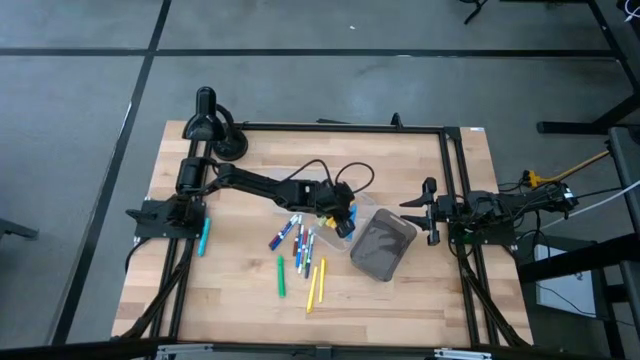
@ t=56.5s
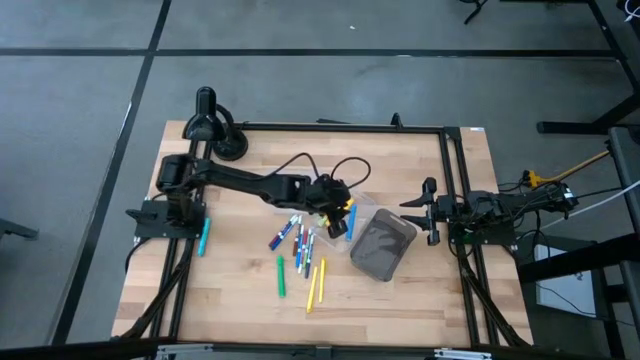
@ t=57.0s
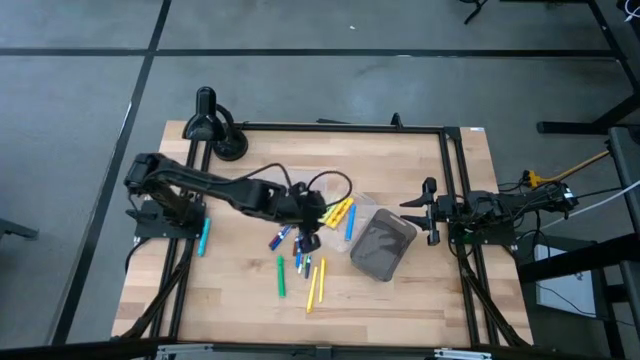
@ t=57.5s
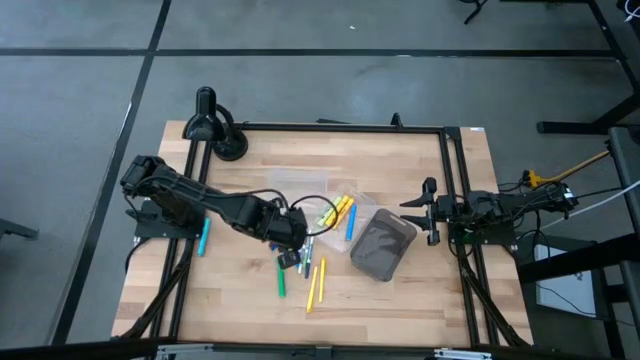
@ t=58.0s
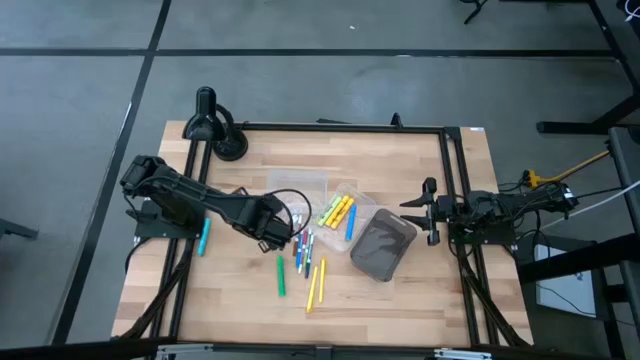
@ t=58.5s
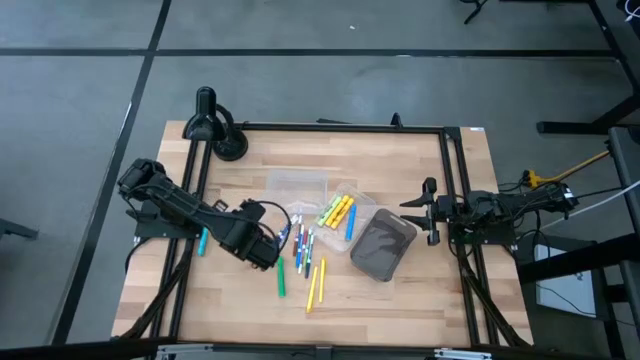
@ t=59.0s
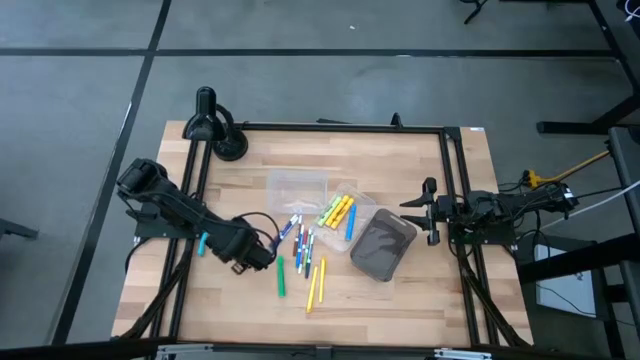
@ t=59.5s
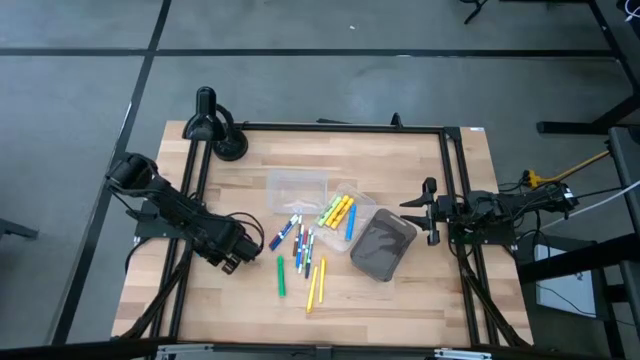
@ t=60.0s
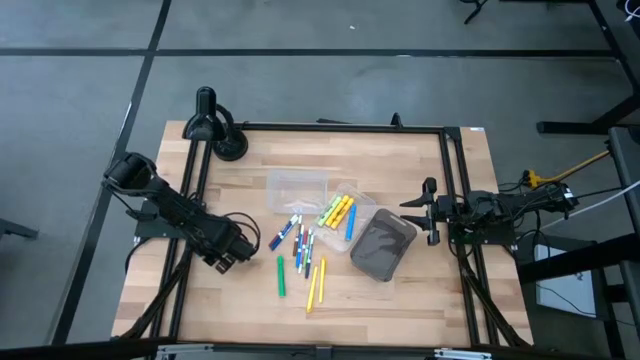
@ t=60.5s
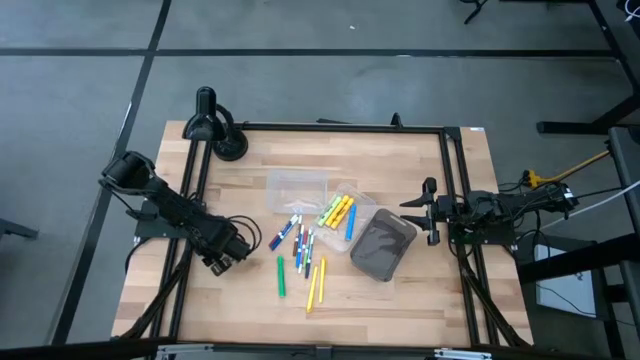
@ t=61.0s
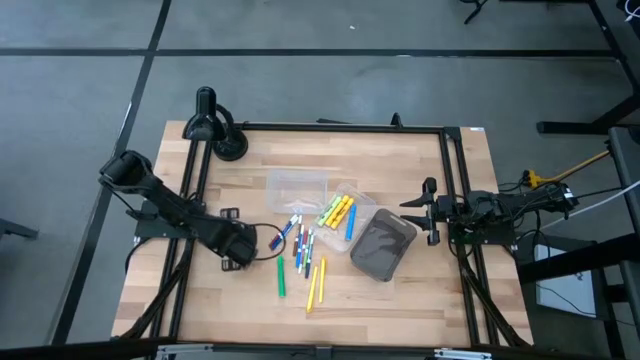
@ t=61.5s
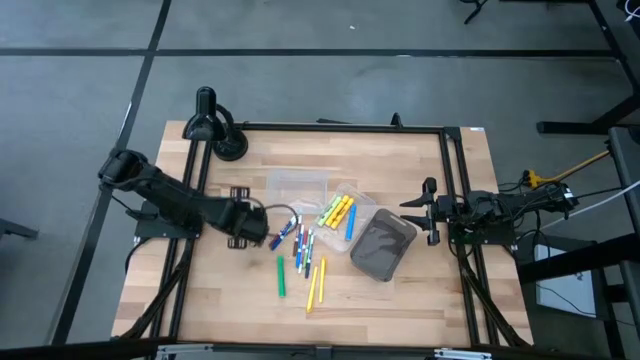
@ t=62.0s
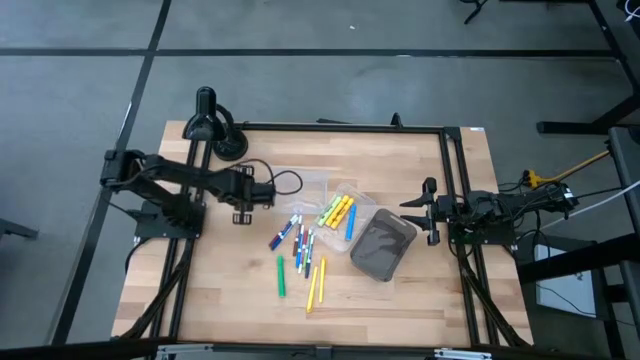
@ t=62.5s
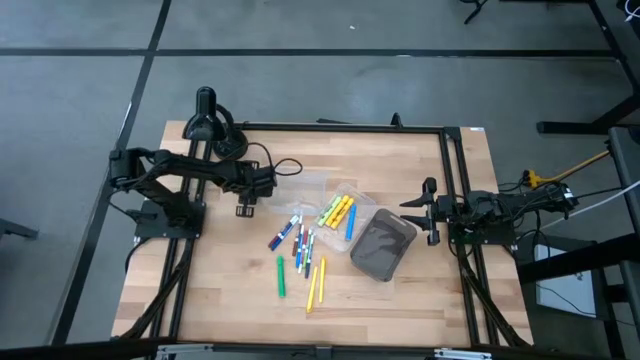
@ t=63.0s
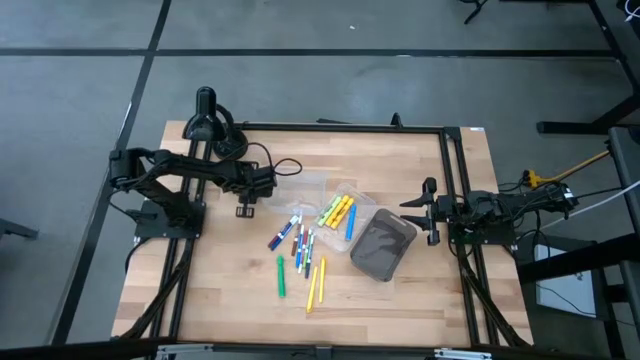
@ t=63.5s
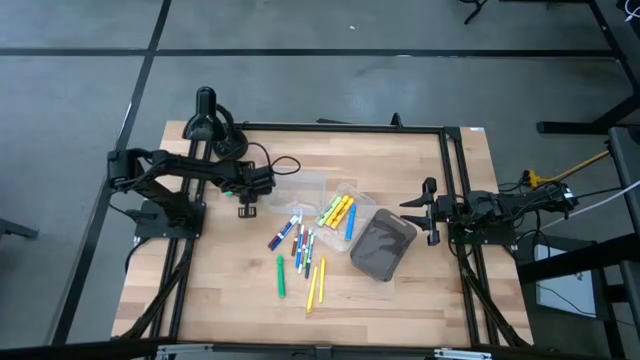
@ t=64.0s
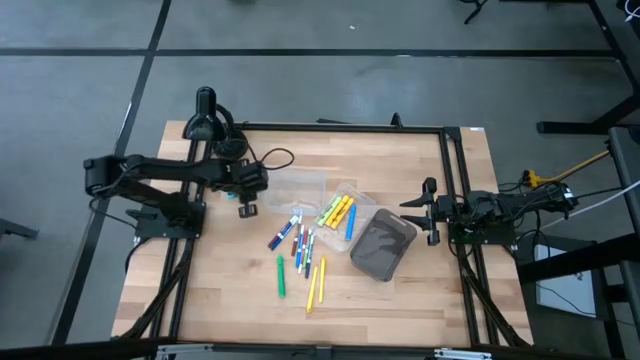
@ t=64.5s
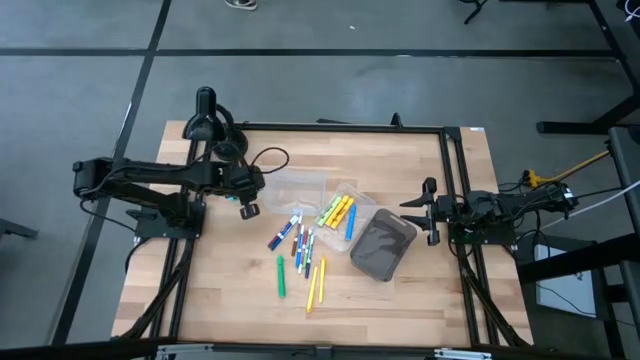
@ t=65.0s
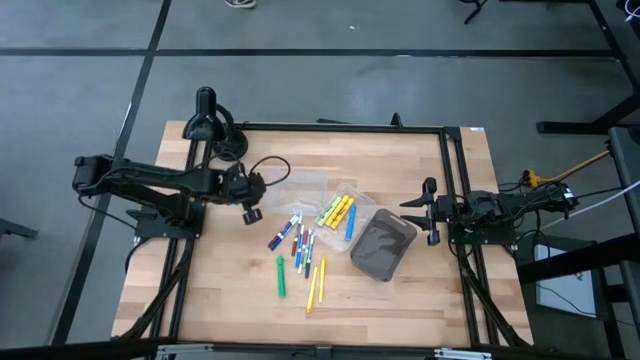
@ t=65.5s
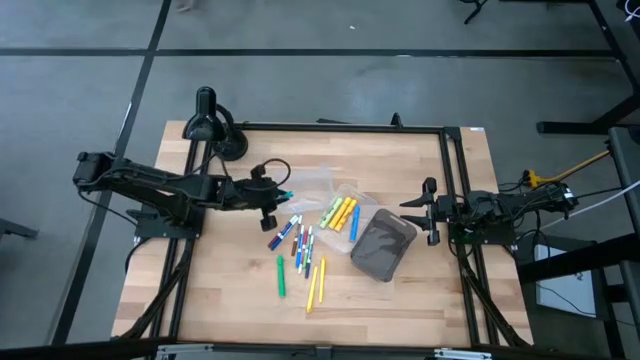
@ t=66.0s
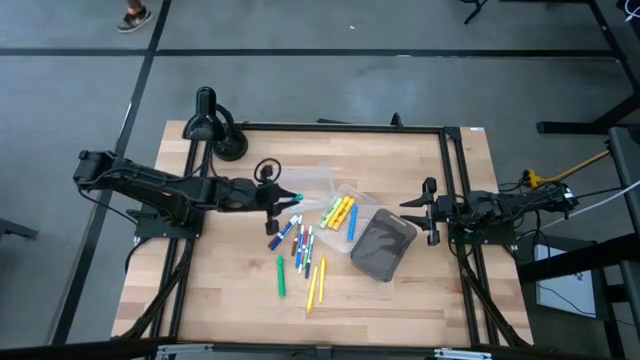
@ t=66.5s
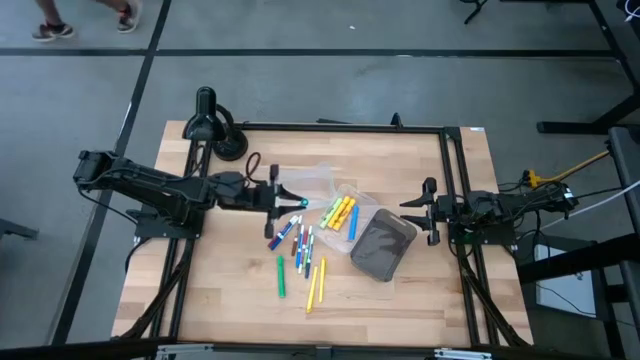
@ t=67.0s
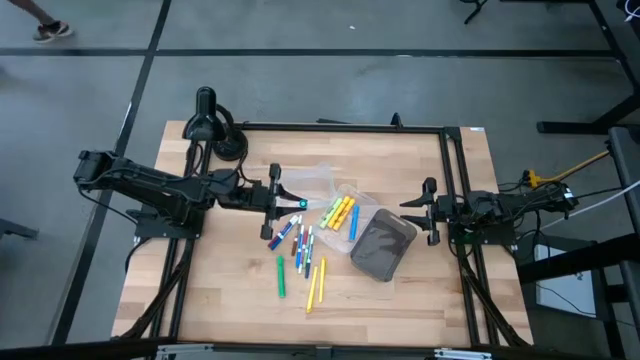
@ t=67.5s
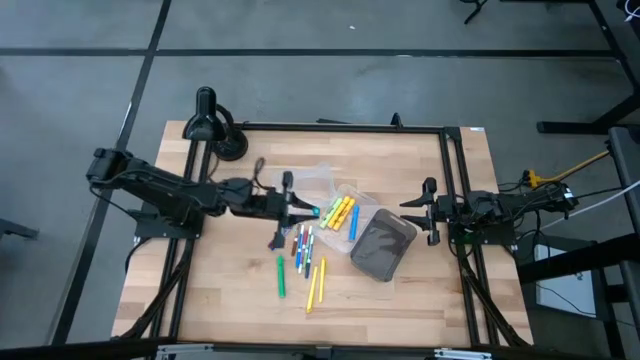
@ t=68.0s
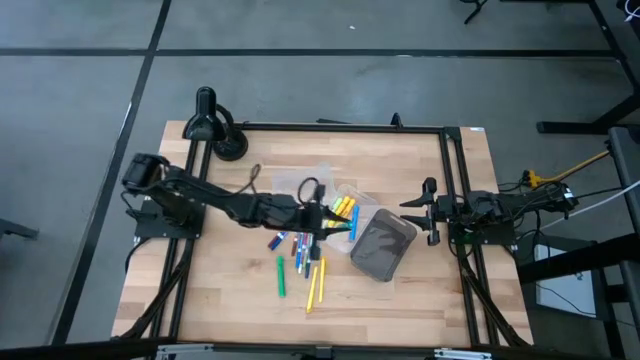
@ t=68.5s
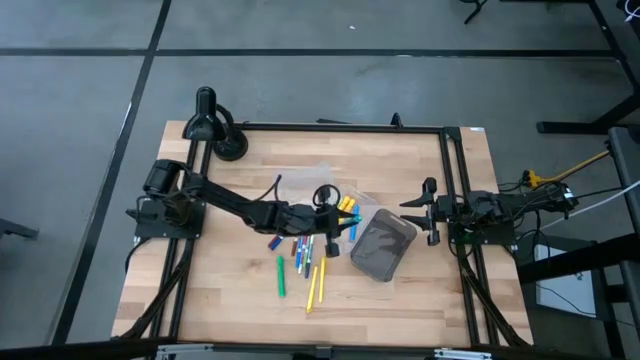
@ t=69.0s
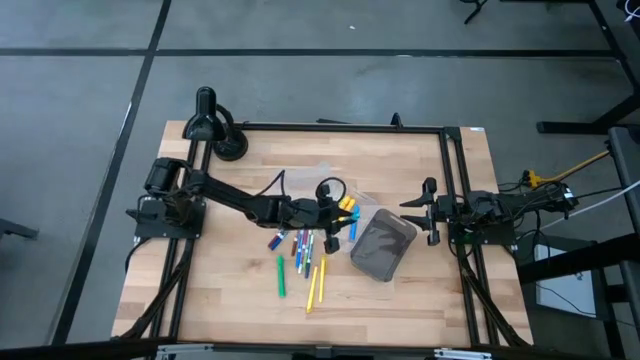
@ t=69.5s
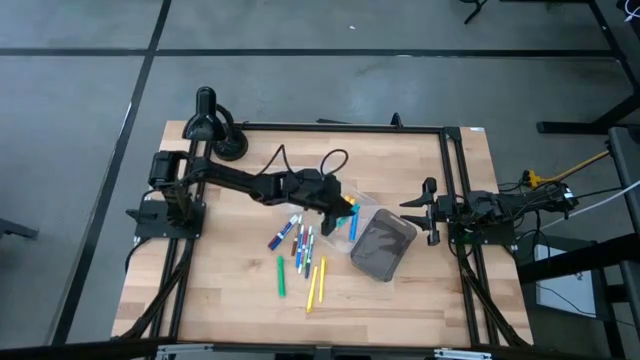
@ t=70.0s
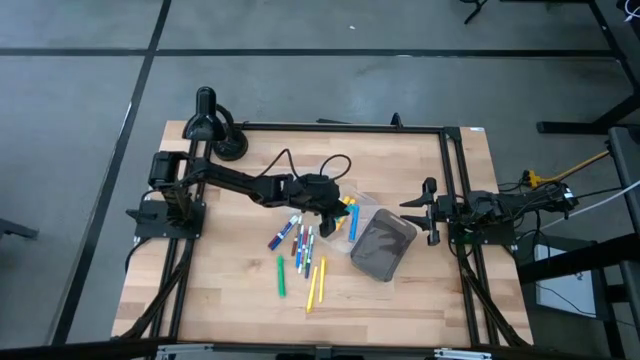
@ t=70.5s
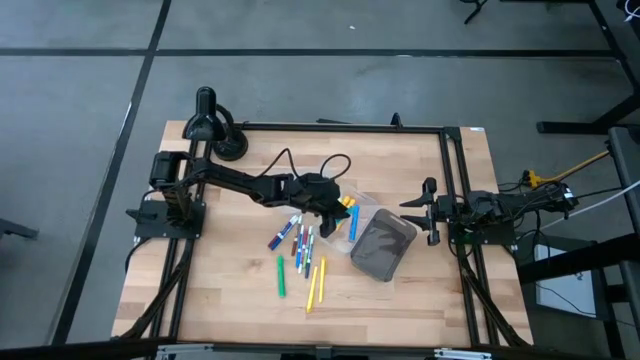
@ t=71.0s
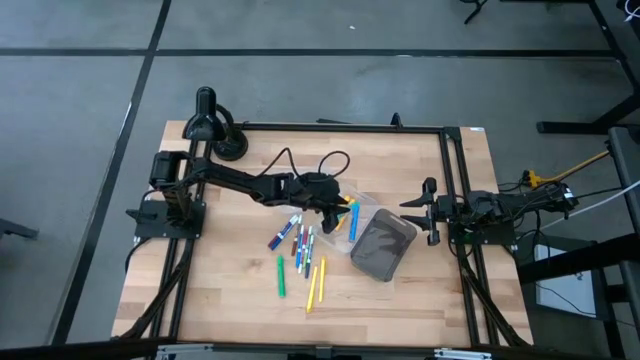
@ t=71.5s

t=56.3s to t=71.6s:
Task: Pick & Place Markers
Put the light blue highlighter pen into the right transparent bin

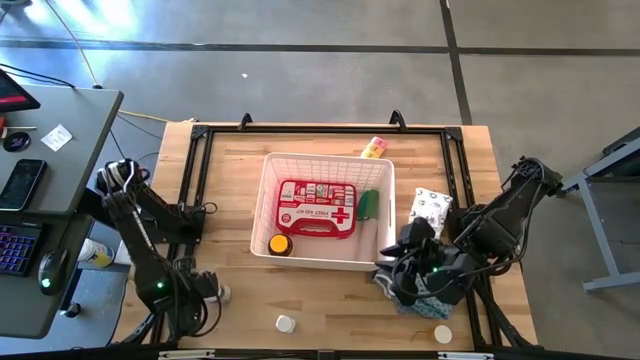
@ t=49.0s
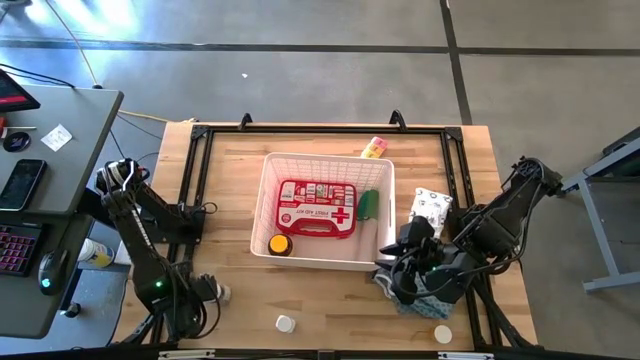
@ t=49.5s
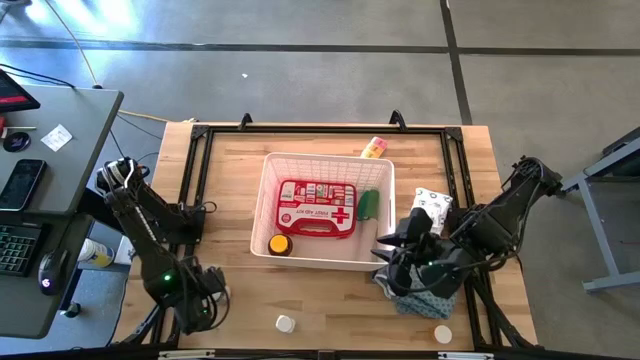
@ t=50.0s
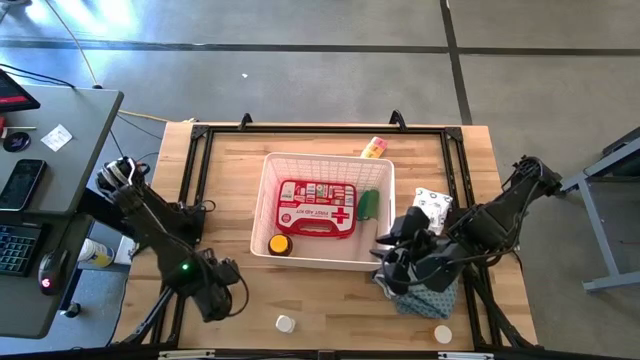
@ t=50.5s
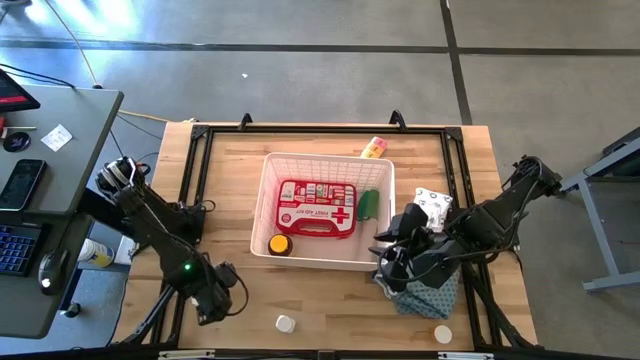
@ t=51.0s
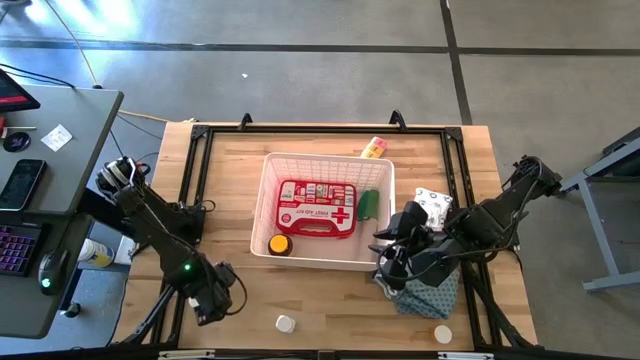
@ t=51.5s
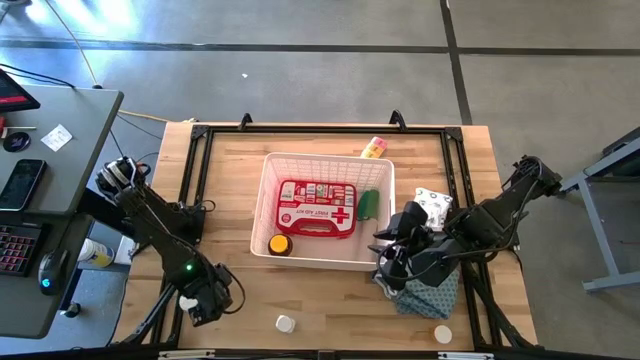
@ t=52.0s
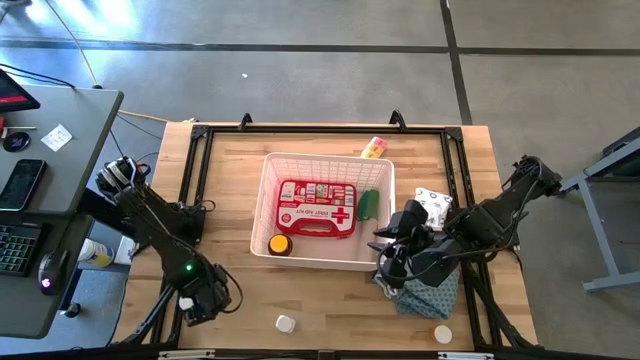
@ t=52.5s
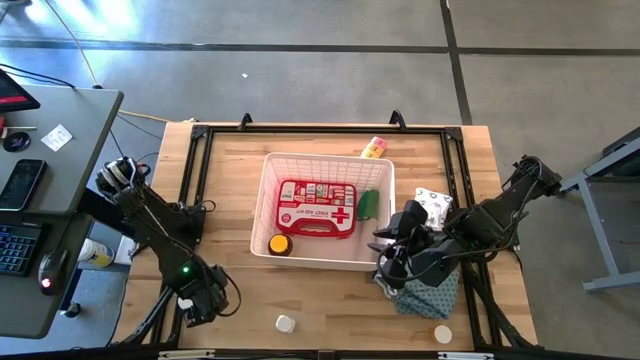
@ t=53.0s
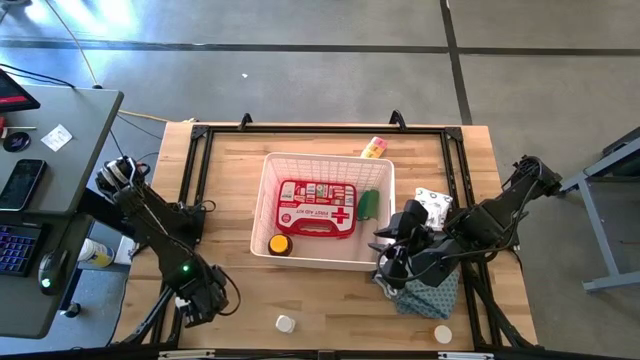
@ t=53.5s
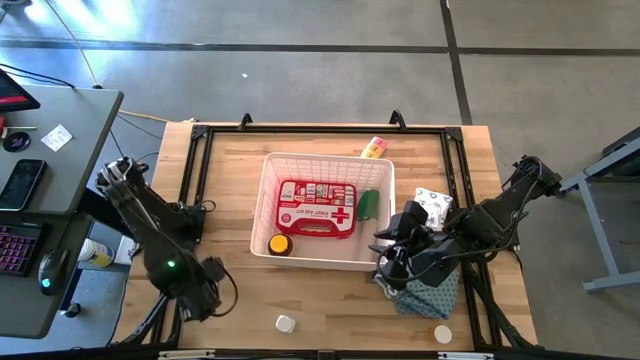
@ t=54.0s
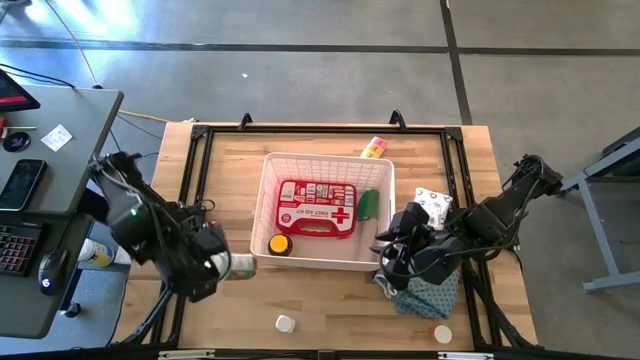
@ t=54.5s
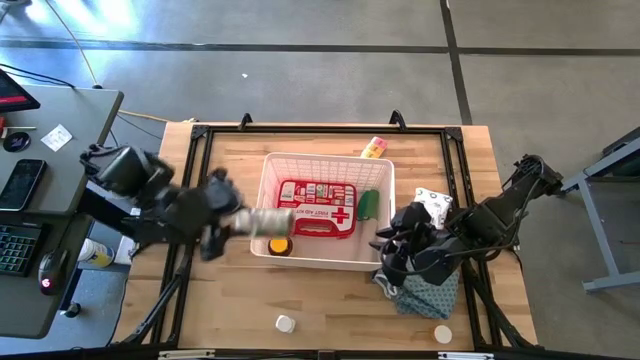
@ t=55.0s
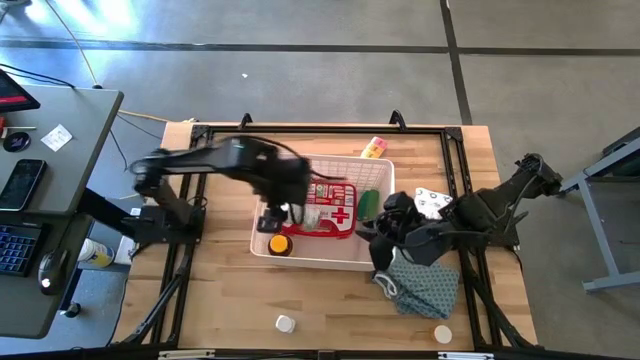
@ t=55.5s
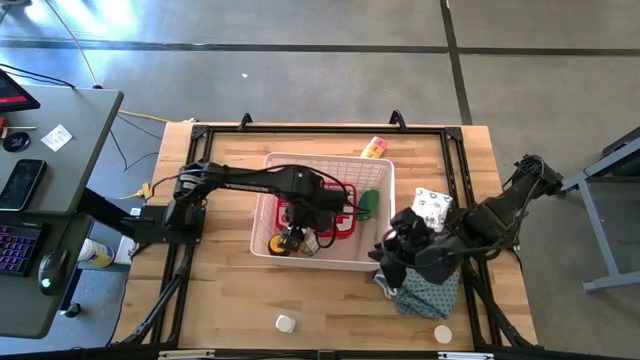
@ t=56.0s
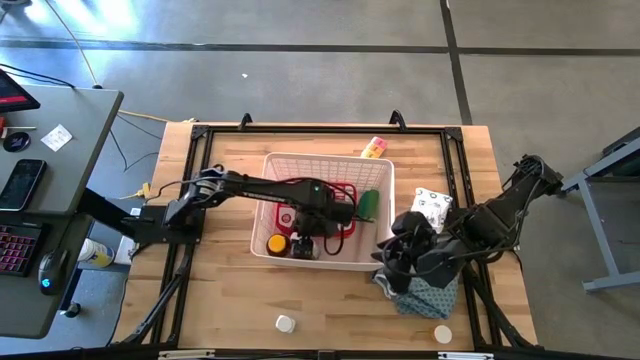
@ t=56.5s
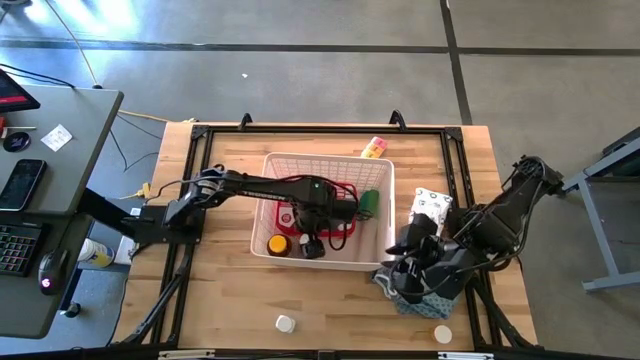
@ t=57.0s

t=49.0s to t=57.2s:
Task: Pick & place medical supplies in basket/bin
Put the left white pill bottle into the white container
